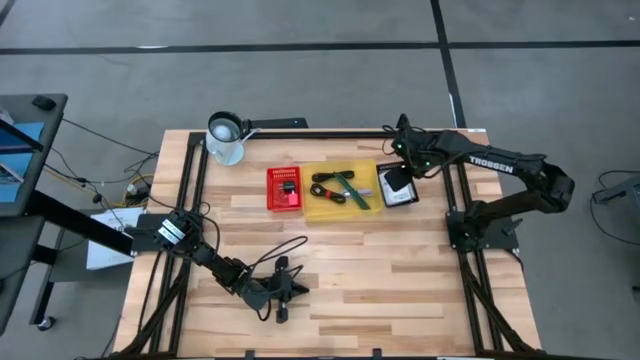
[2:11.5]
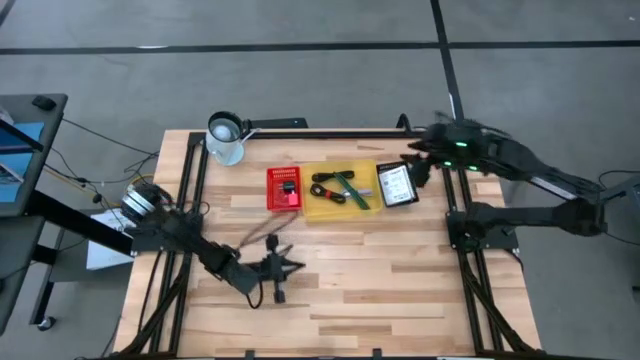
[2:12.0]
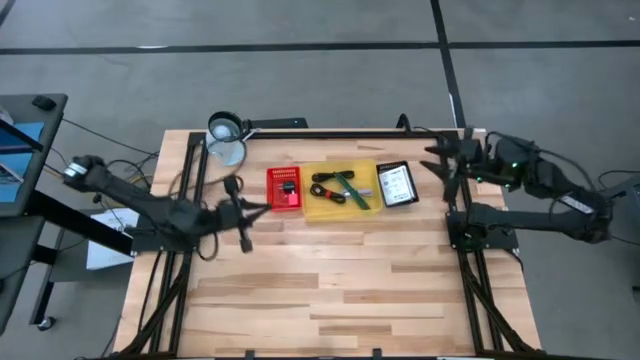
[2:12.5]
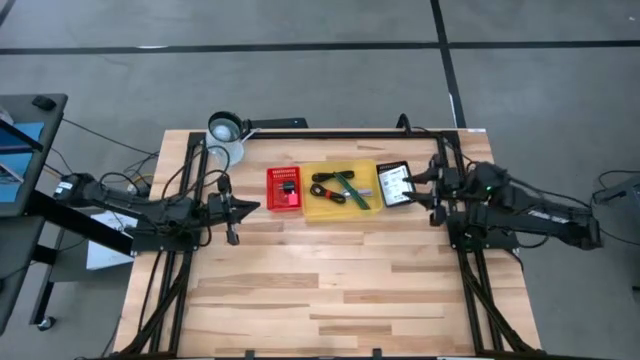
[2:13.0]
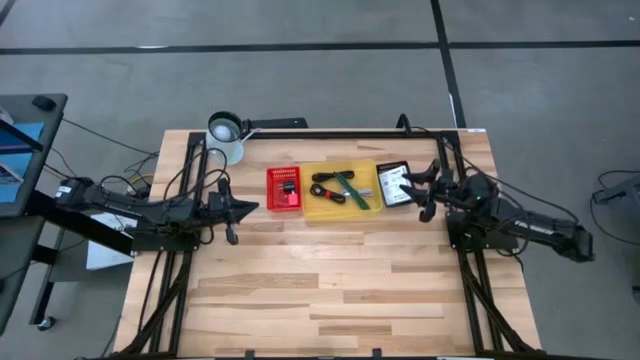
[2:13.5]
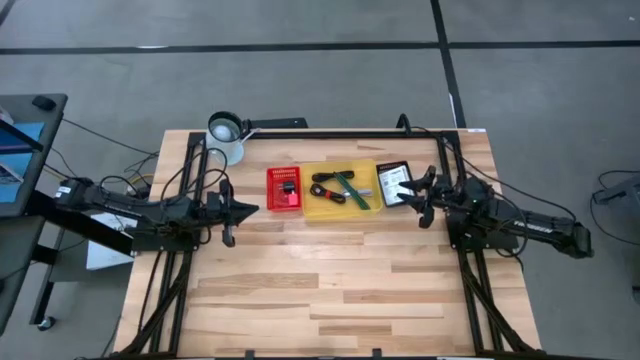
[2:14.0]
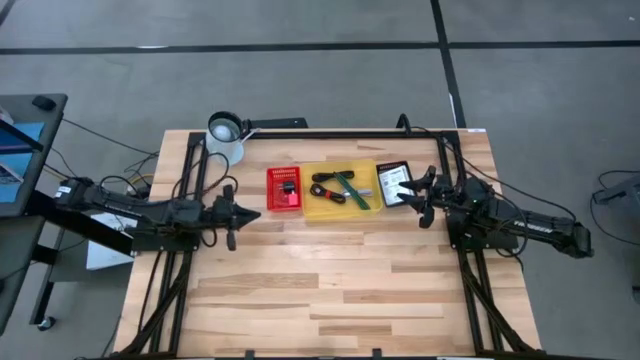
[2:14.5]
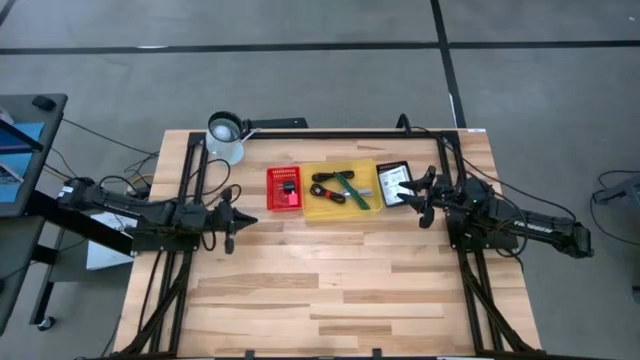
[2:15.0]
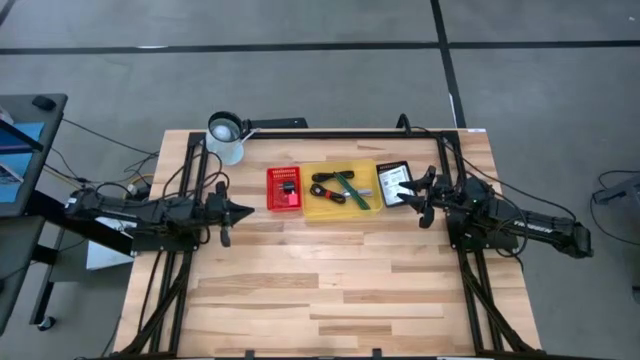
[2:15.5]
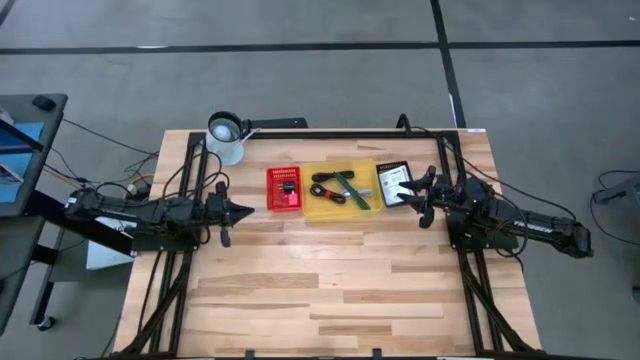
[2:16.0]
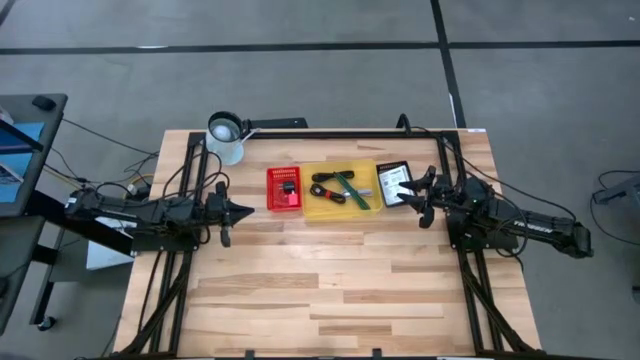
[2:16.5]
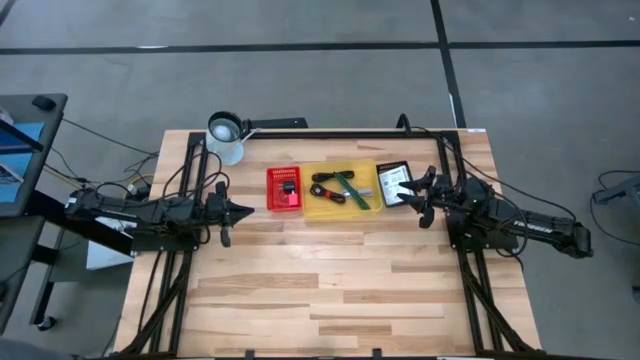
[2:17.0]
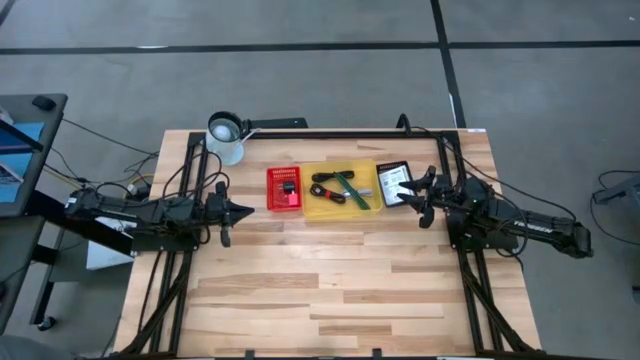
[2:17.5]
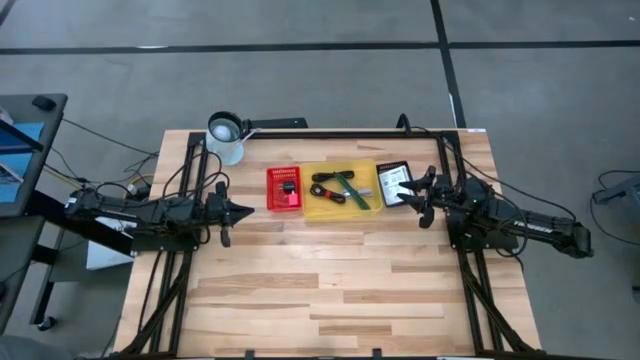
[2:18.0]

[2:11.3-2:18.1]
Task: Pick and place items into bin
Return to Home Position

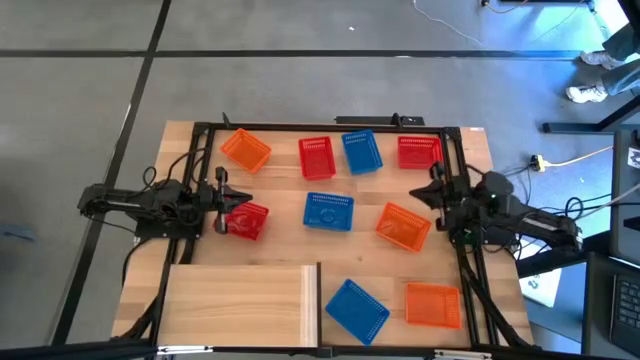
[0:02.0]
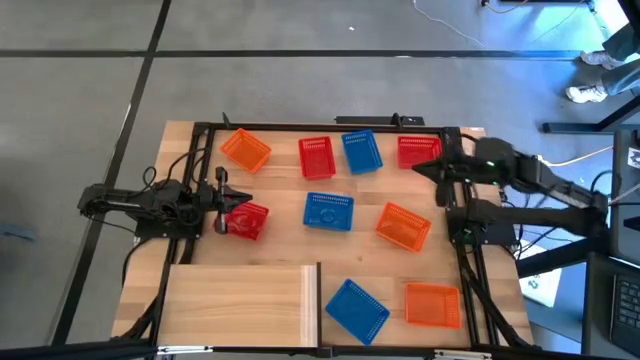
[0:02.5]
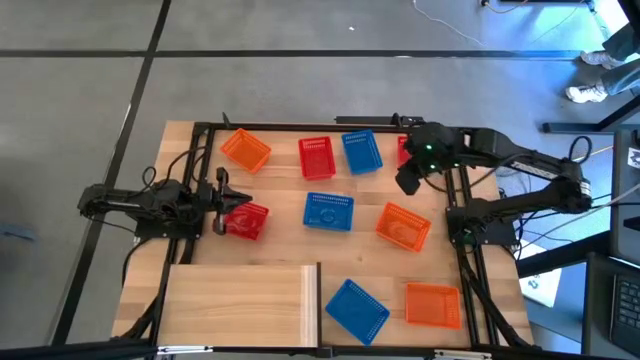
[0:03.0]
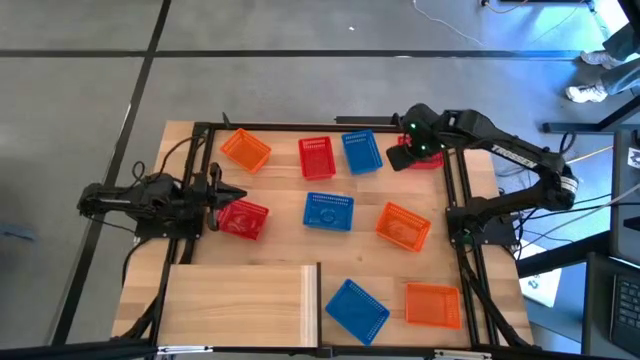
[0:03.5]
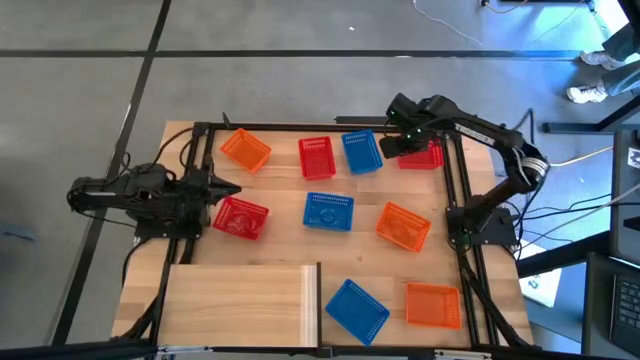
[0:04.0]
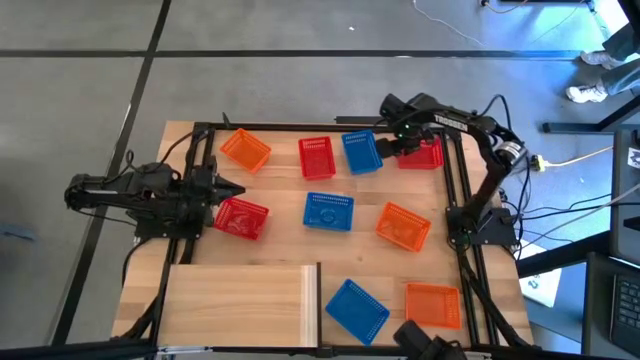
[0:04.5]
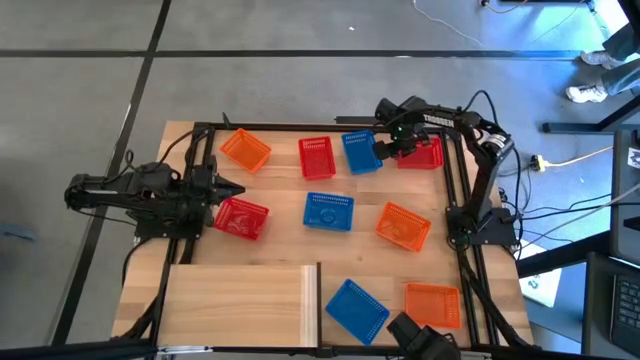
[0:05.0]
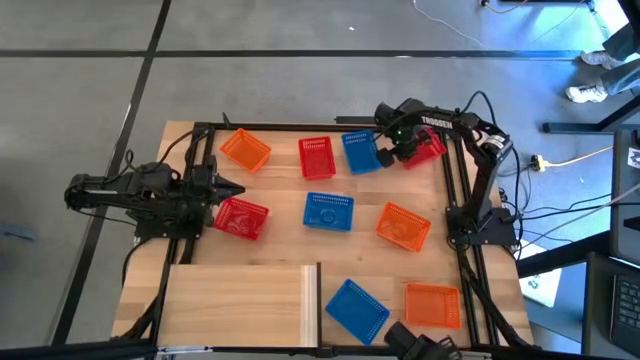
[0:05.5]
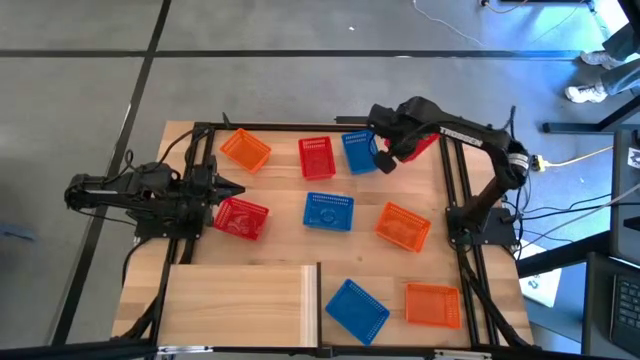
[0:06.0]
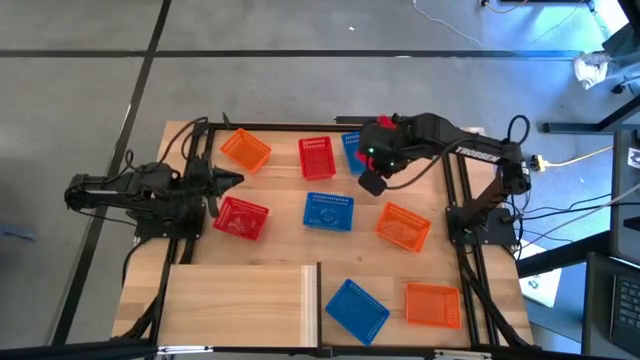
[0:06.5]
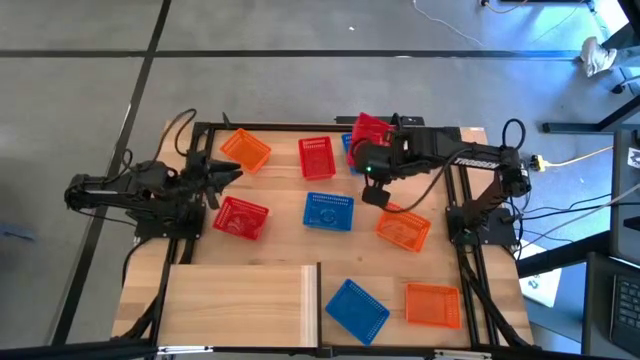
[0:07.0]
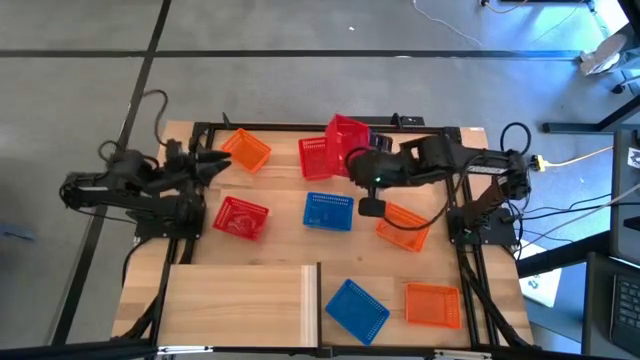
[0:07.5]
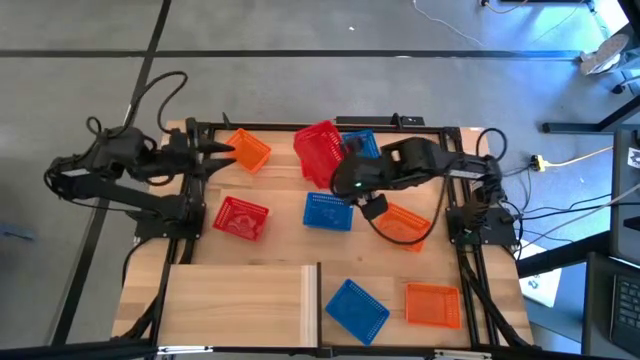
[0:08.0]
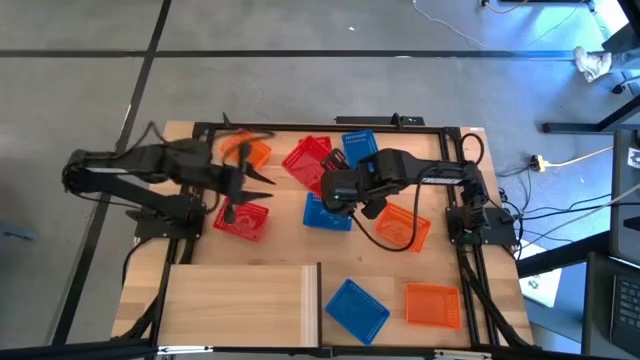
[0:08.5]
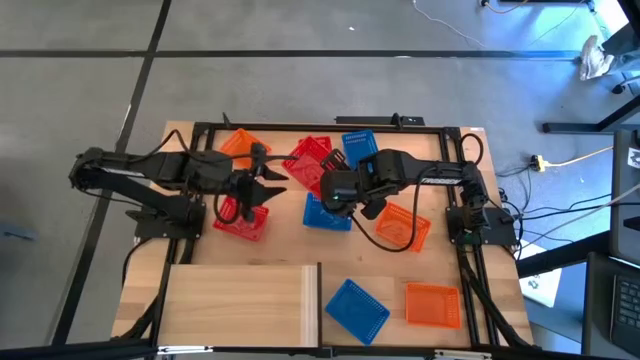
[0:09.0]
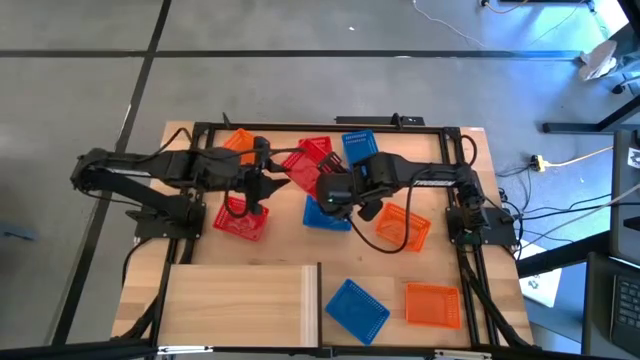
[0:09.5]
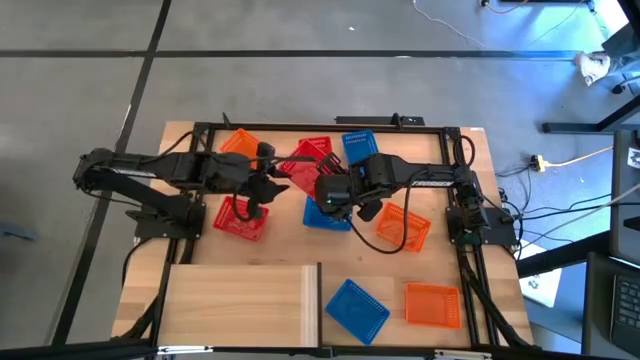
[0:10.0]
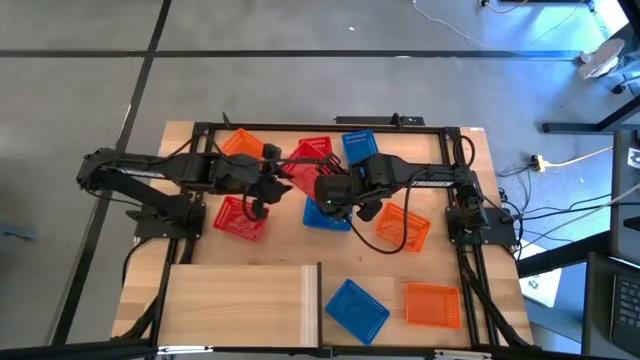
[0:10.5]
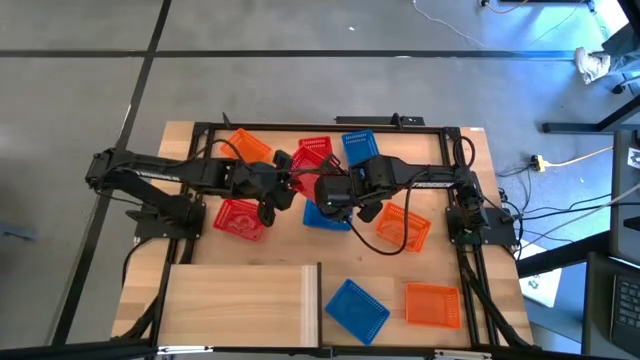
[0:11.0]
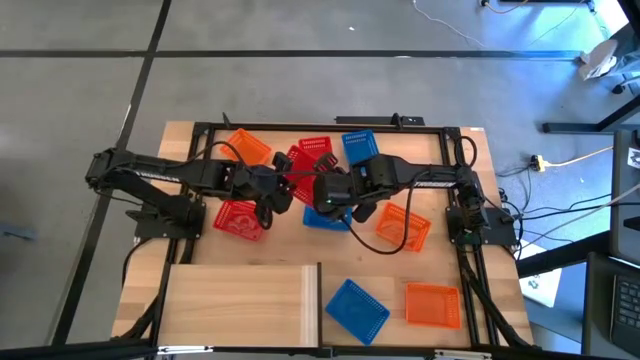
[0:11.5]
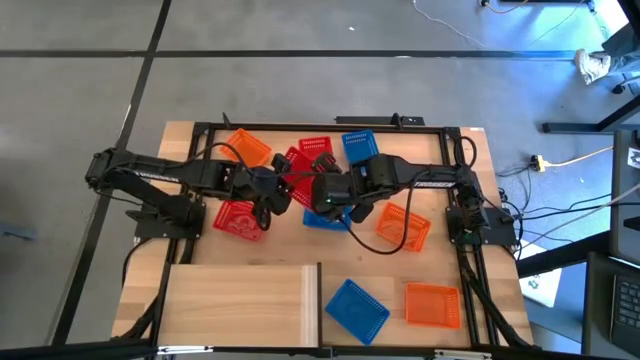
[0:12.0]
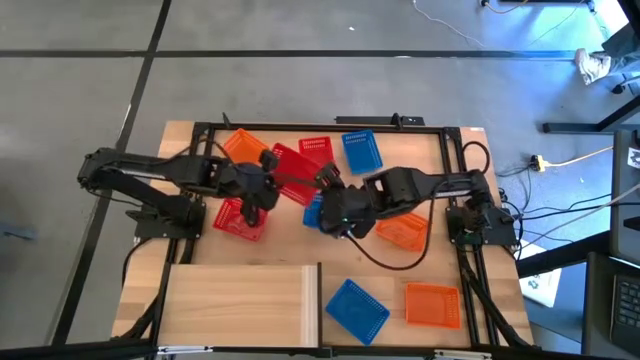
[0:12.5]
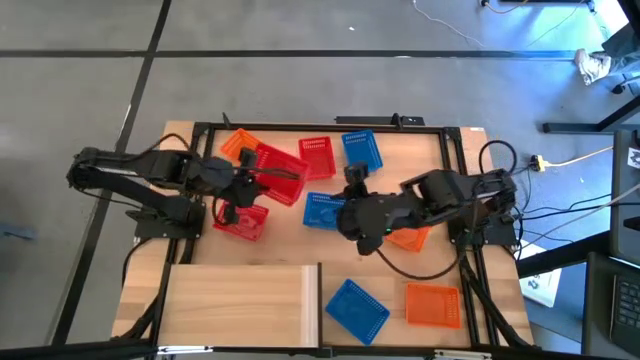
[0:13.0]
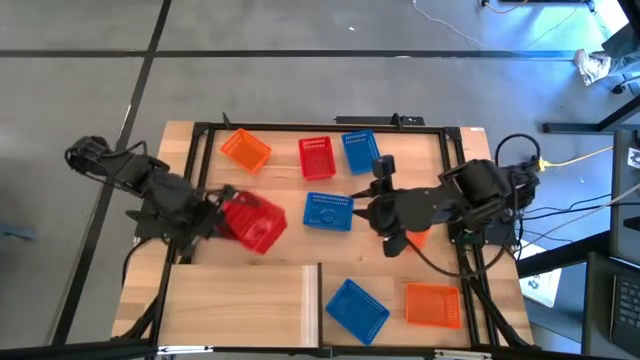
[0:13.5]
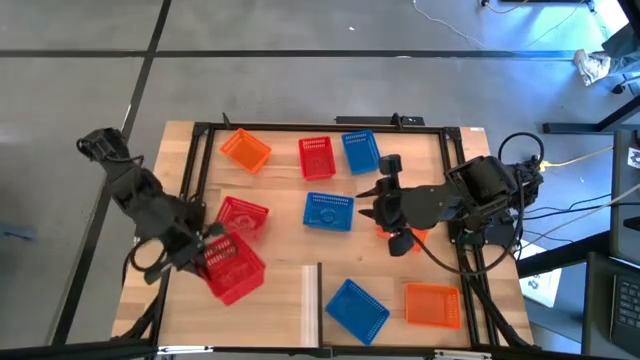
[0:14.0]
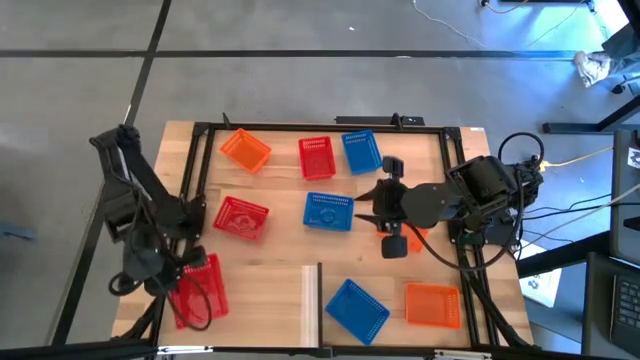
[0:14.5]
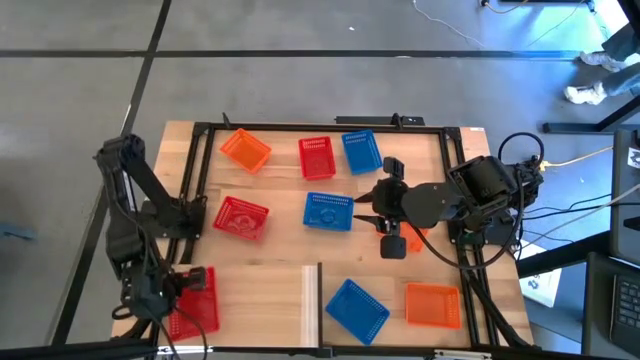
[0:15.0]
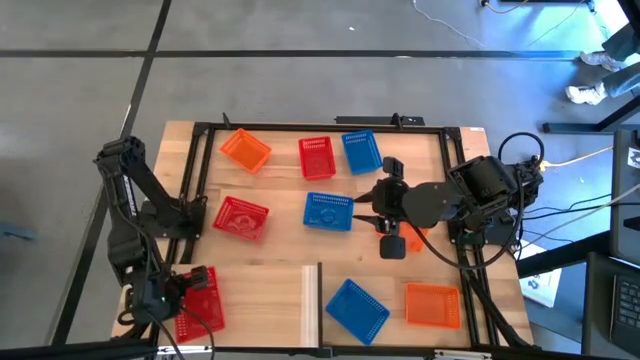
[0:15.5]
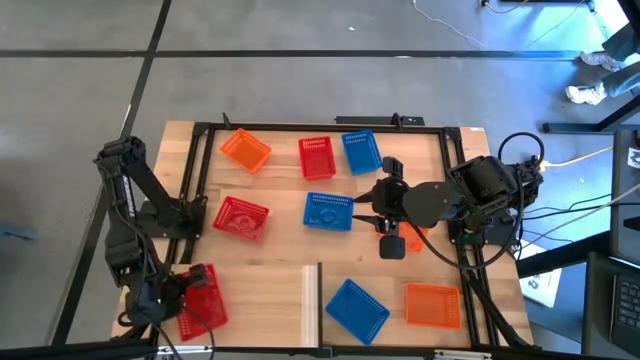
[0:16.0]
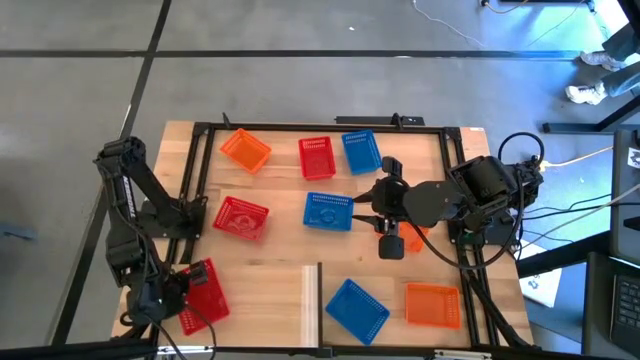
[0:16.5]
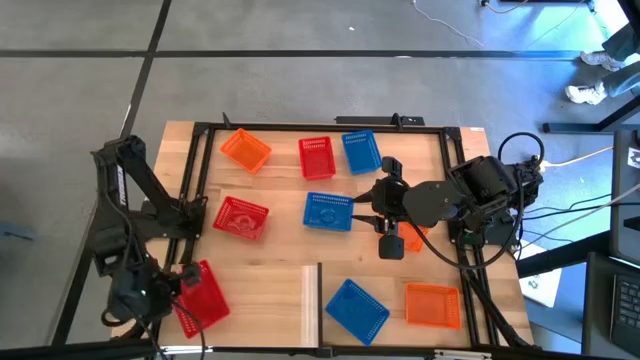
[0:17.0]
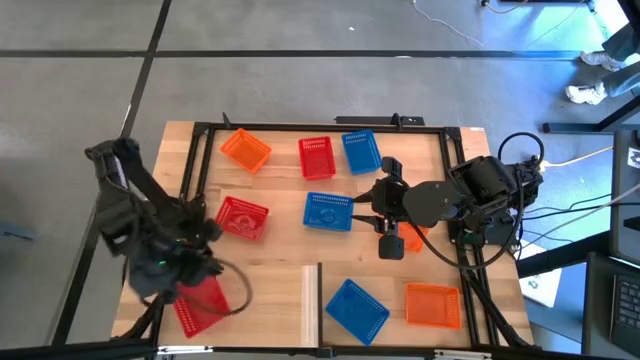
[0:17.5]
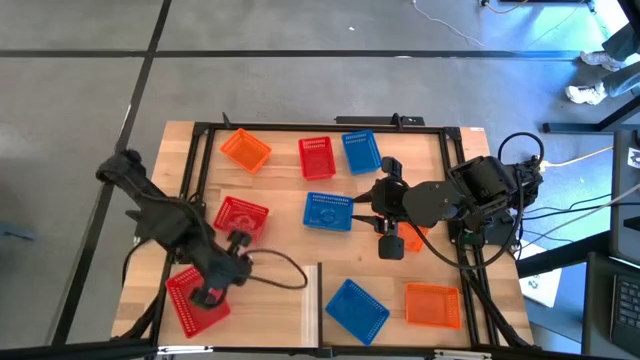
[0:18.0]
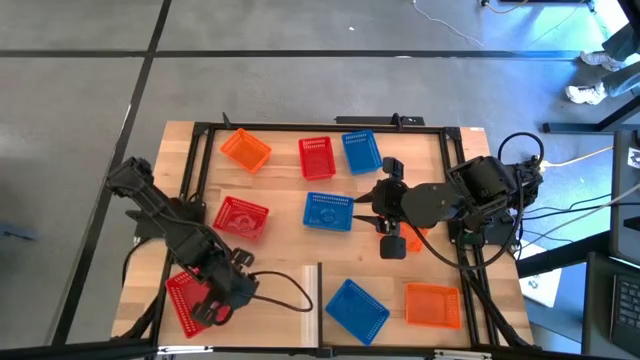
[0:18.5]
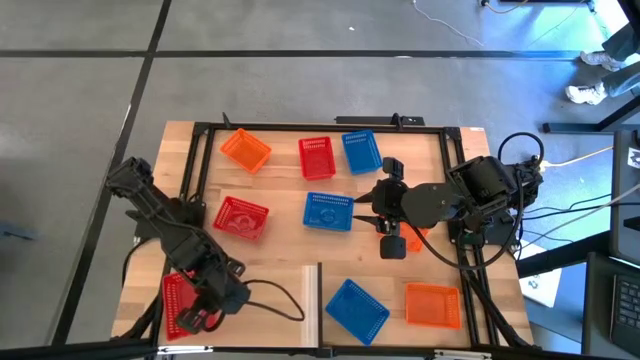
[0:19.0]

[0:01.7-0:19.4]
Task: Stack baskets on shelf by color
Put the top right red bin on the shelf
